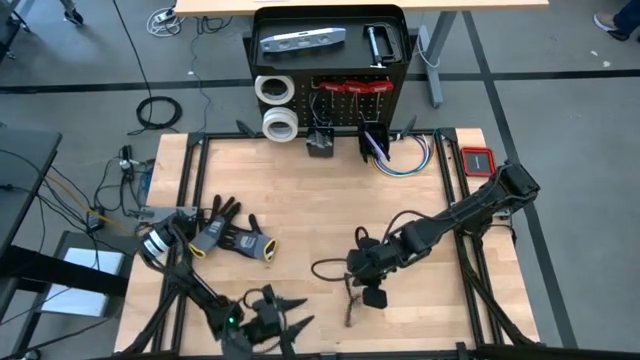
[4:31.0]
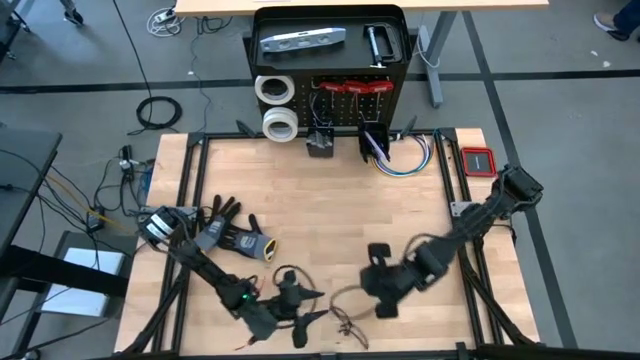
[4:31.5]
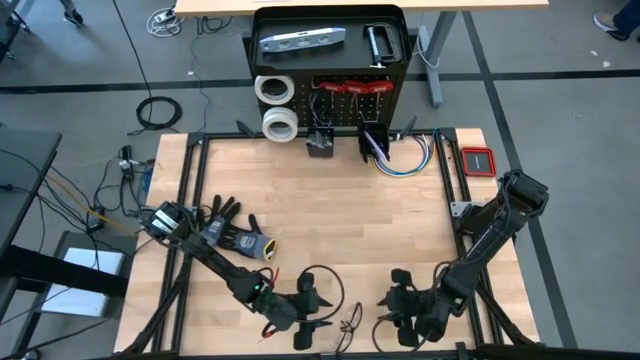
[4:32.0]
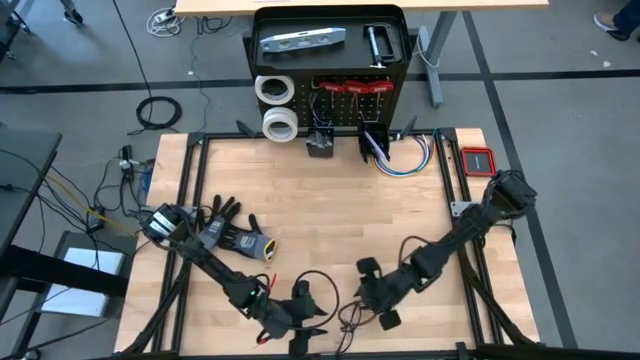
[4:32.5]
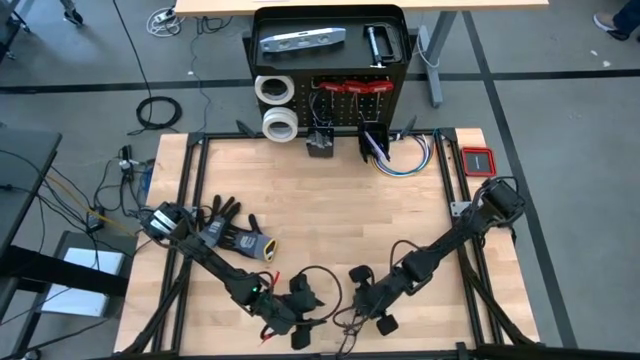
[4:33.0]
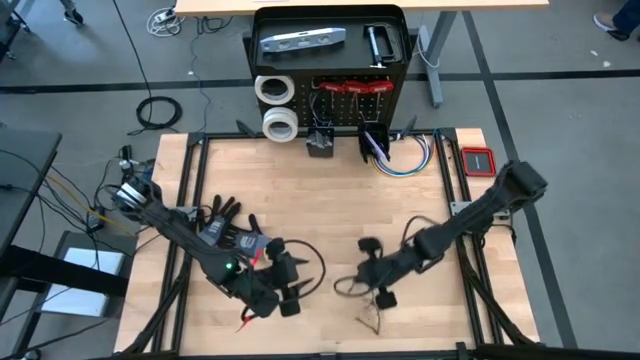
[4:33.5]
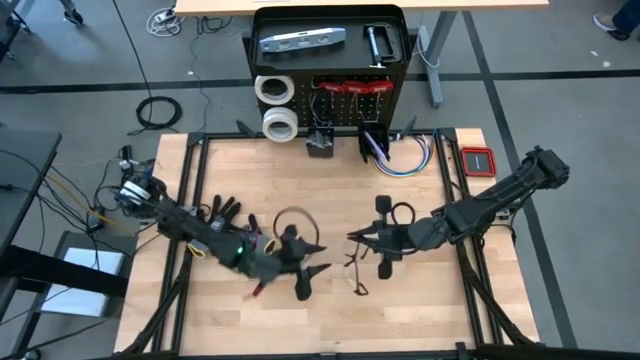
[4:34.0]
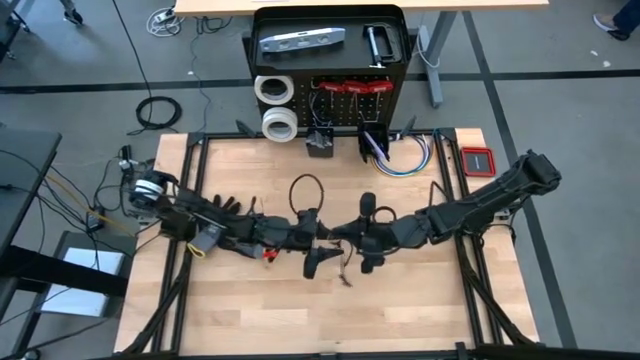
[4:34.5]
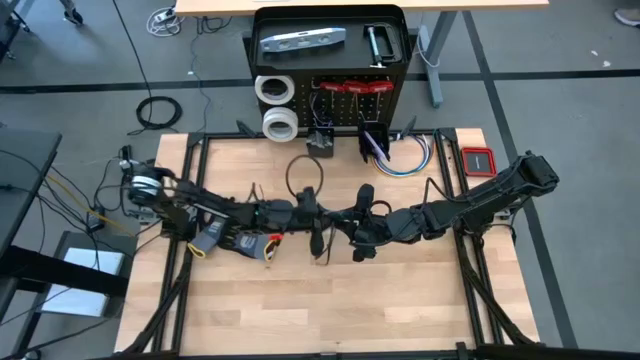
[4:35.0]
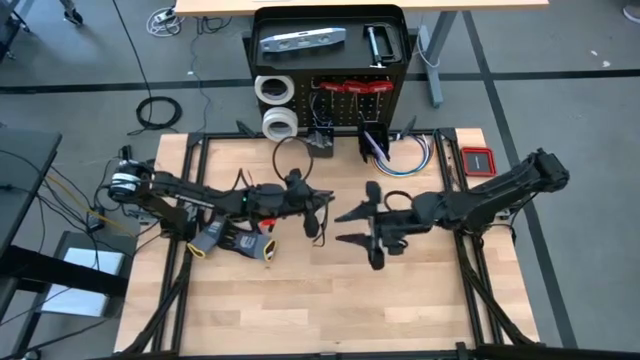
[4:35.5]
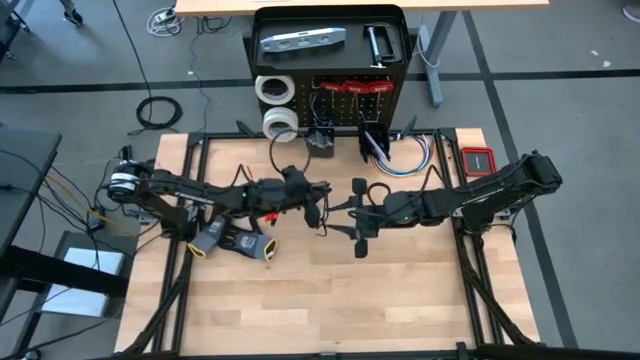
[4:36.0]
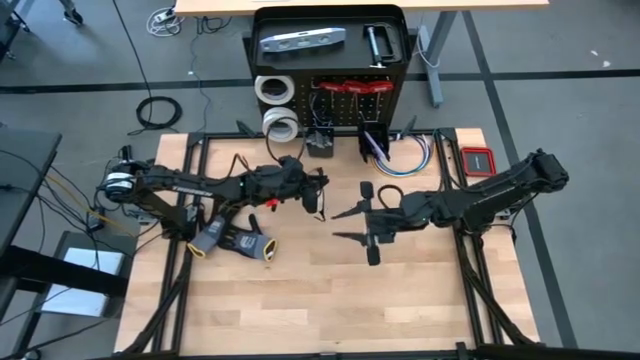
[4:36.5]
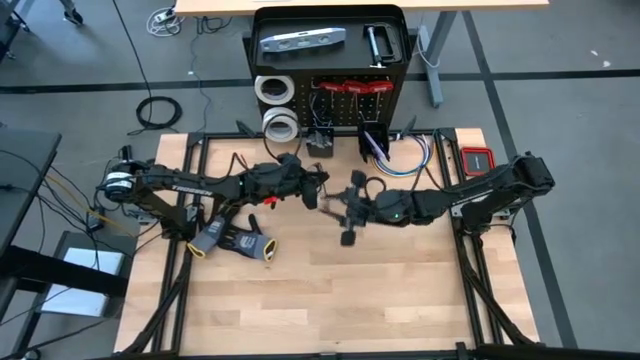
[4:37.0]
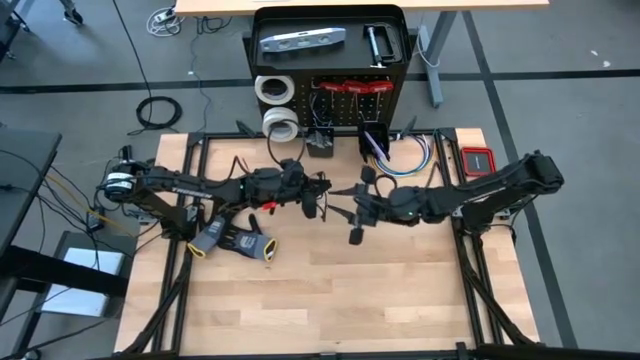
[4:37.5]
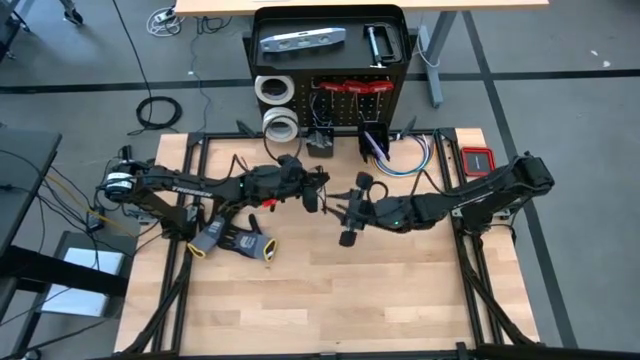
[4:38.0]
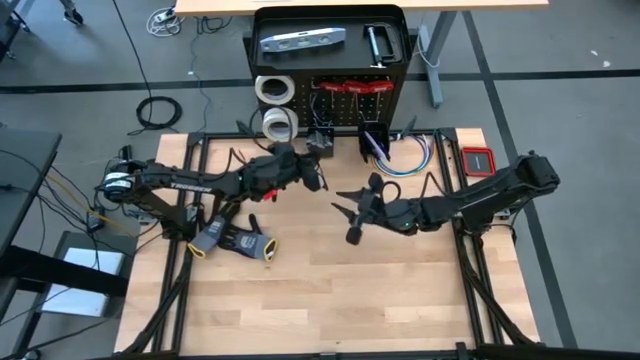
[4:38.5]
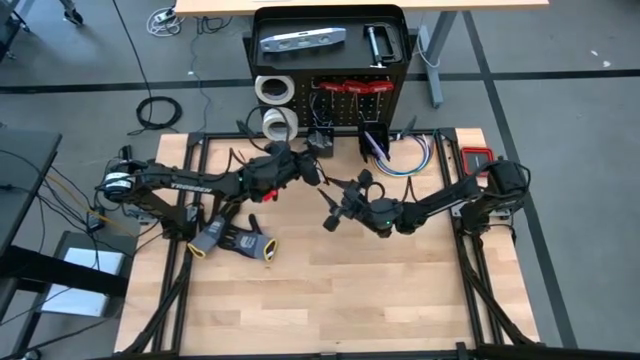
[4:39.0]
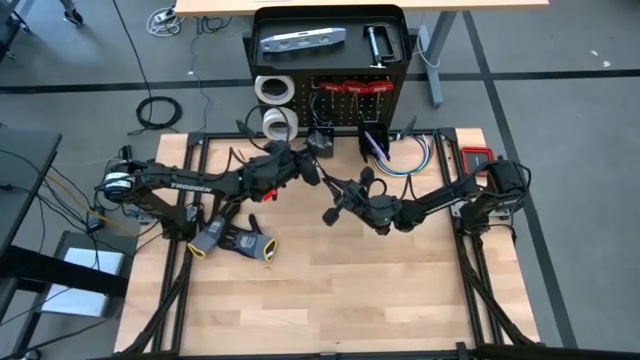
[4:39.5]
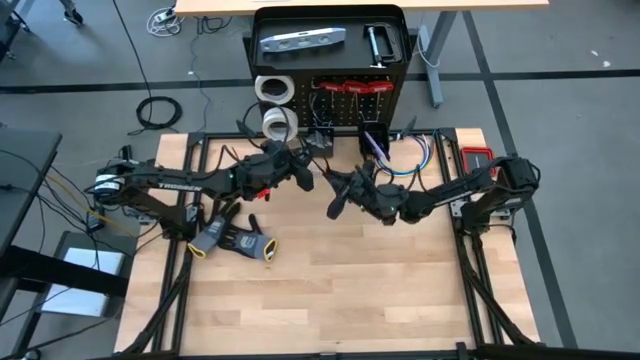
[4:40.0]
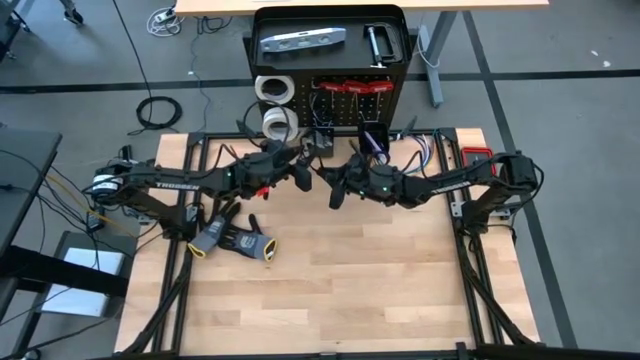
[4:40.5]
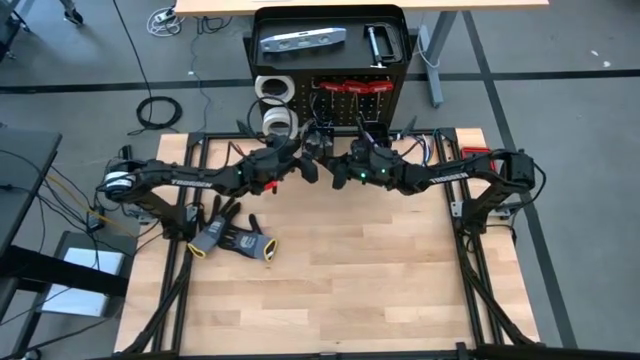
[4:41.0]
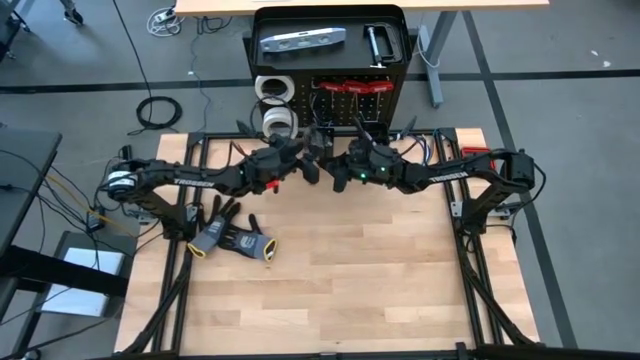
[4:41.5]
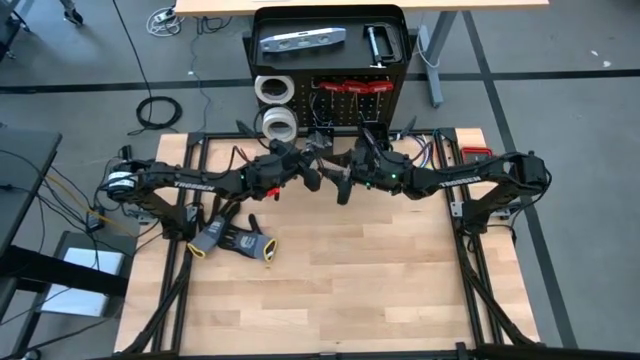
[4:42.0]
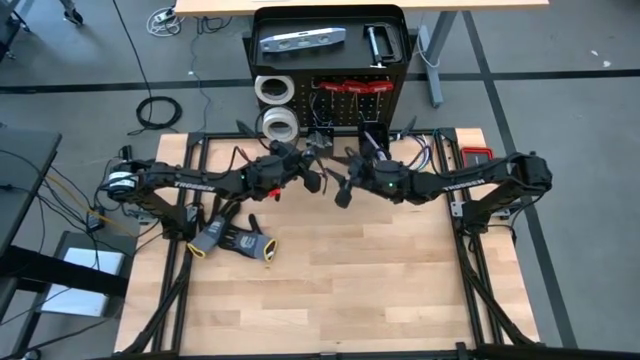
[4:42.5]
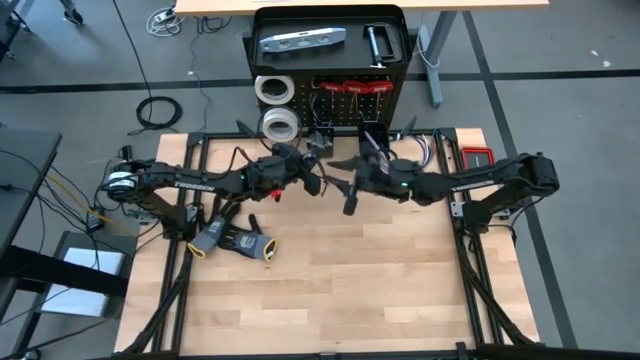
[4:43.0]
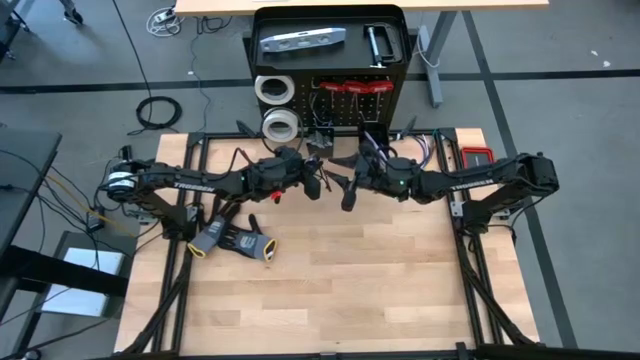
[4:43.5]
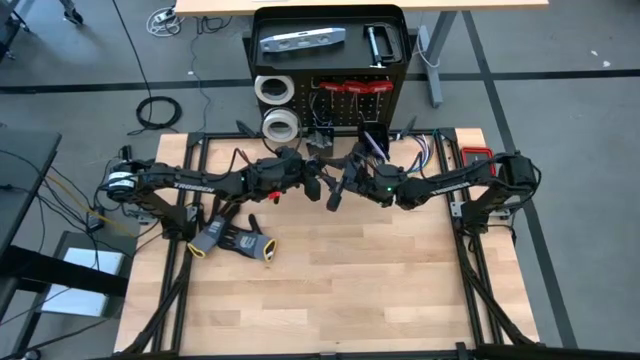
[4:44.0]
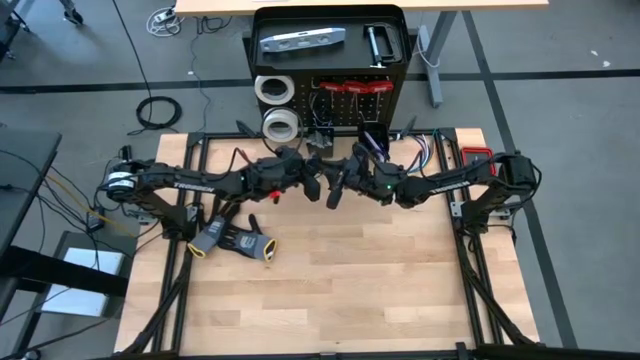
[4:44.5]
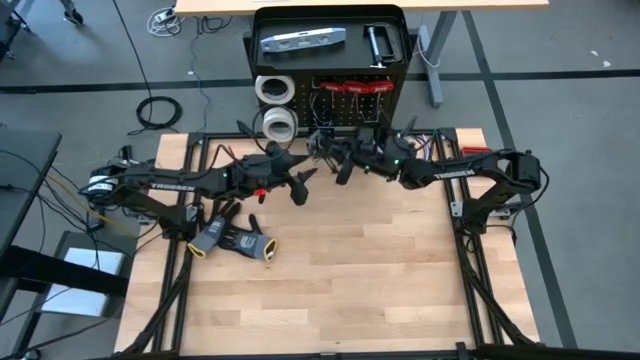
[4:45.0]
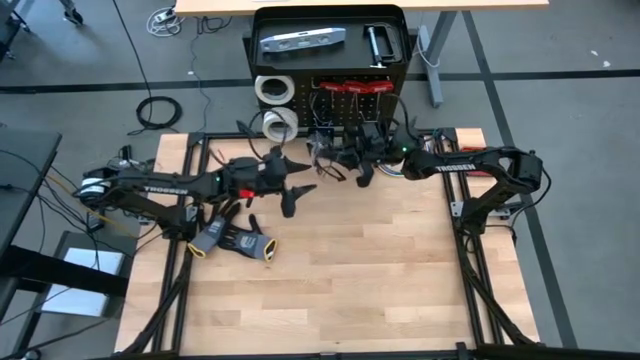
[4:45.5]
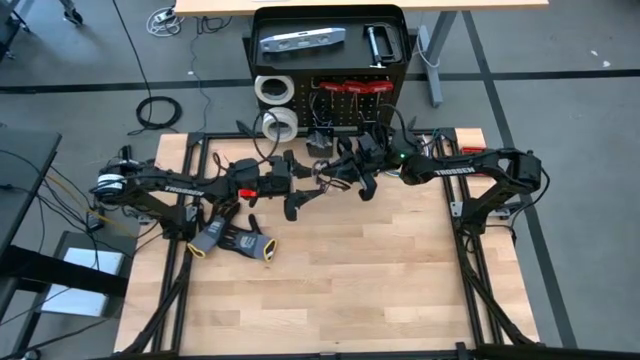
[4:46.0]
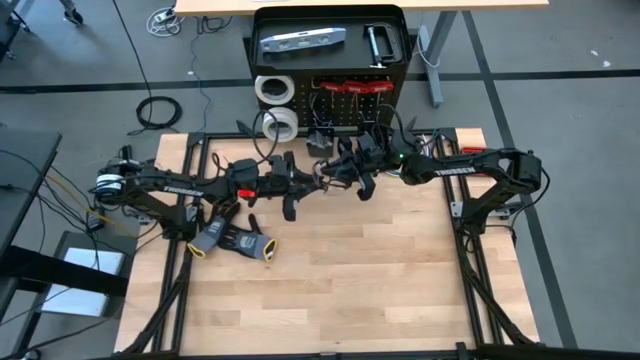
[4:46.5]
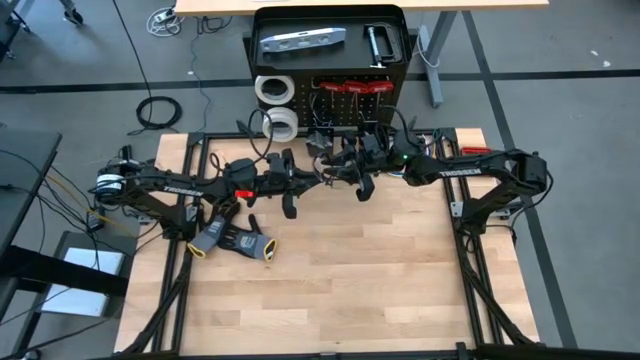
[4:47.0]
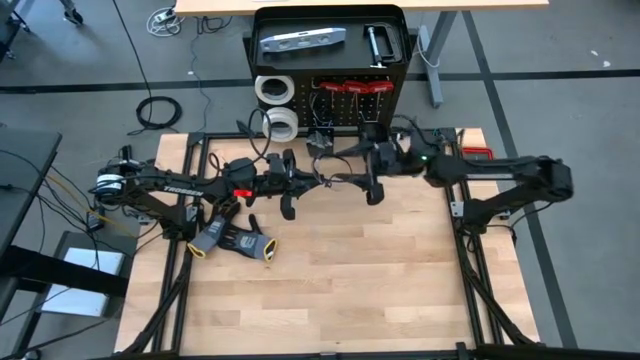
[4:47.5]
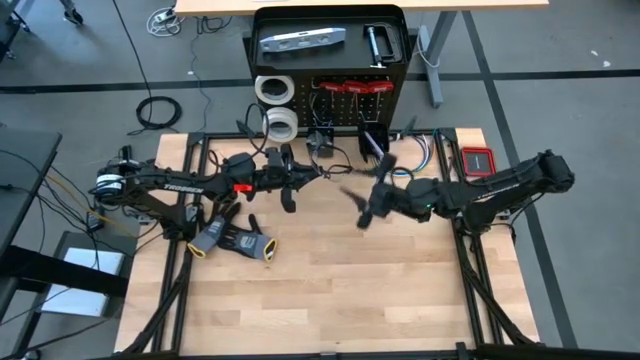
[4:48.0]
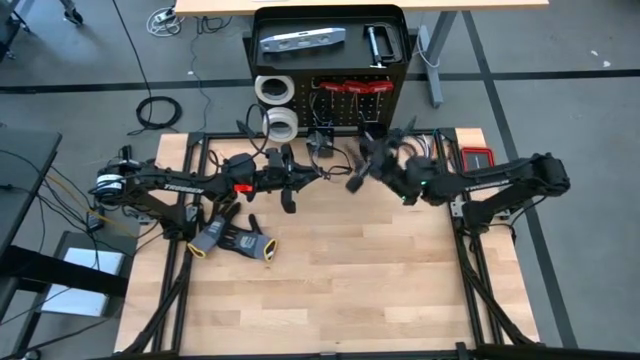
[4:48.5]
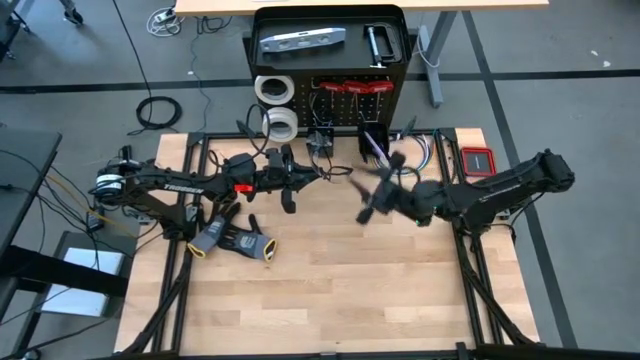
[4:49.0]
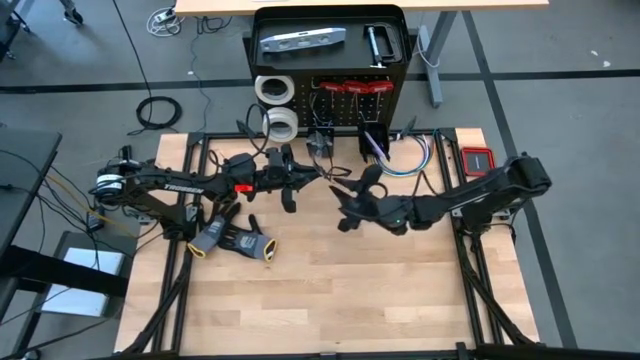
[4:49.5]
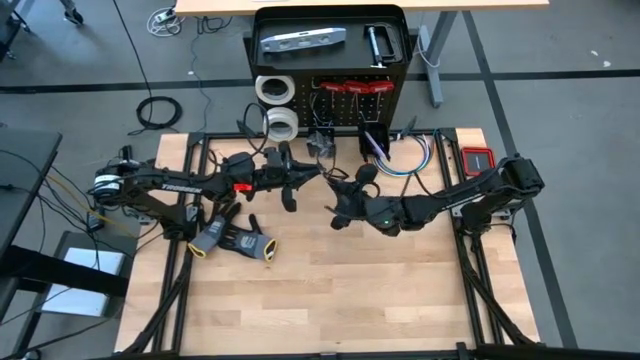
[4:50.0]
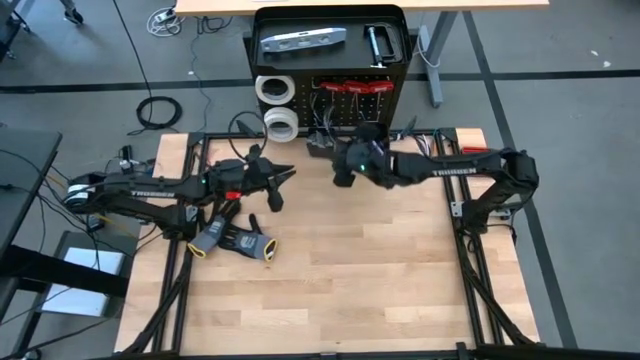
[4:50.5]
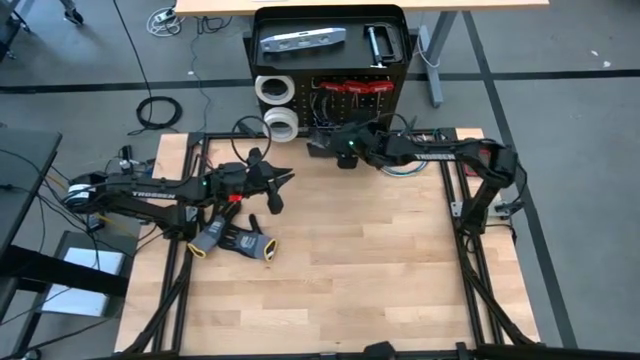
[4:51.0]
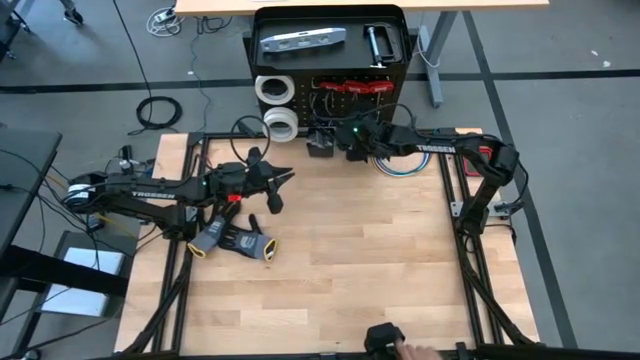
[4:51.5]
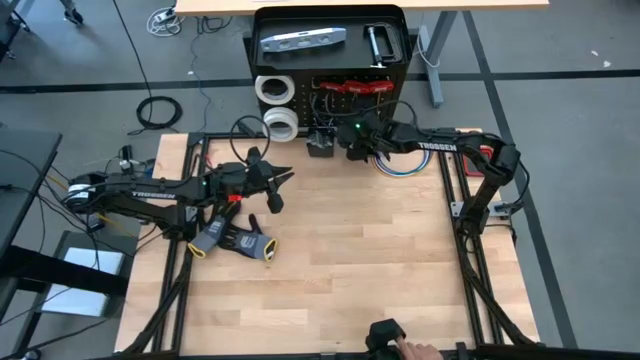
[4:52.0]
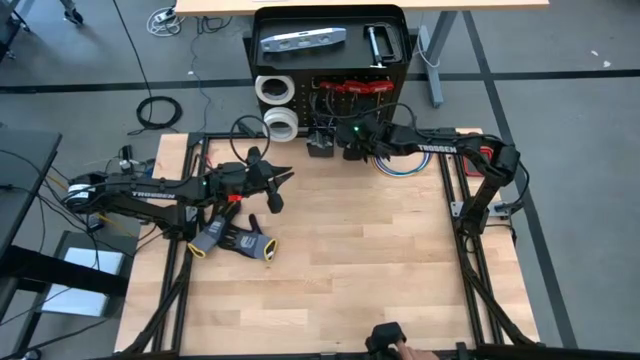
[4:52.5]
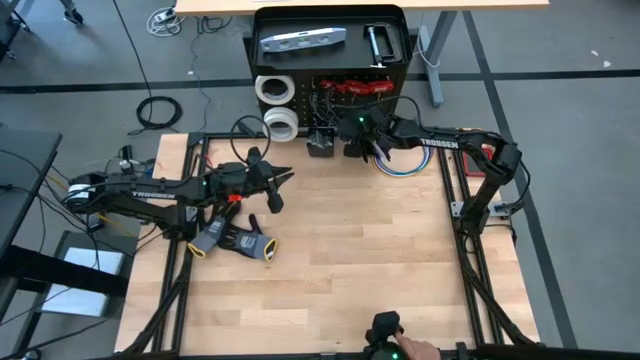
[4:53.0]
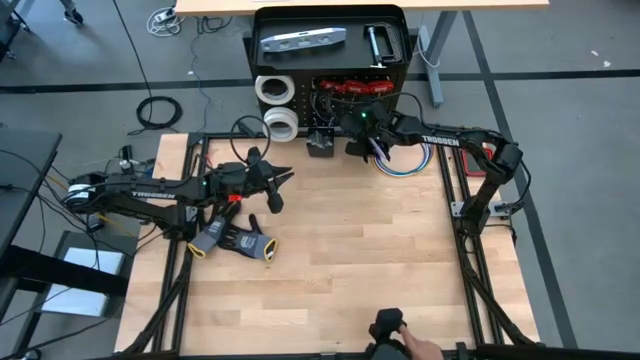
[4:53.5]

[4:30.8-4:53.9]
Task: Hang tools onto peg board
Hang the safety goggles on the peg board
